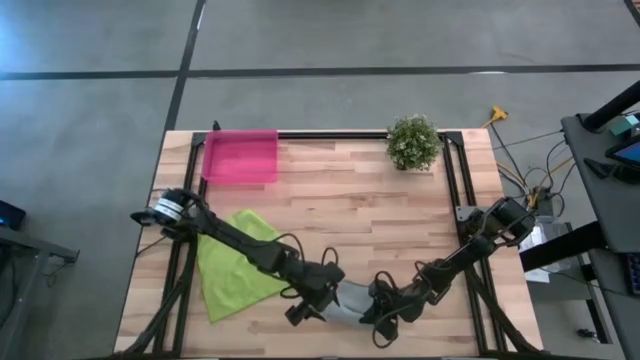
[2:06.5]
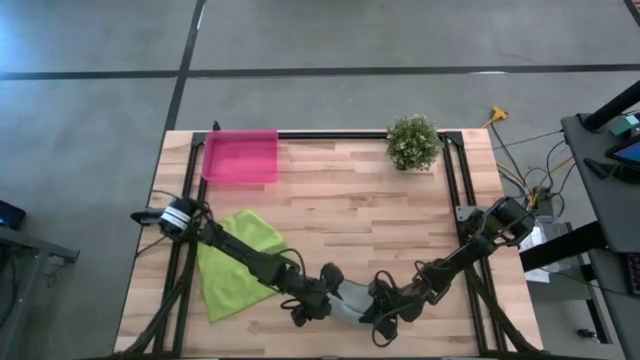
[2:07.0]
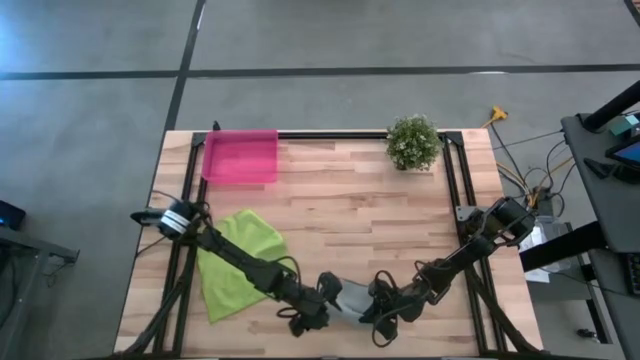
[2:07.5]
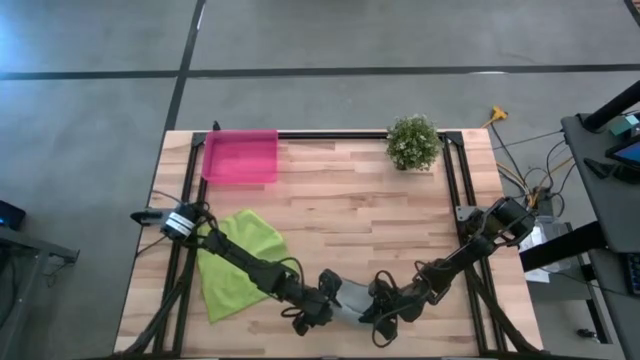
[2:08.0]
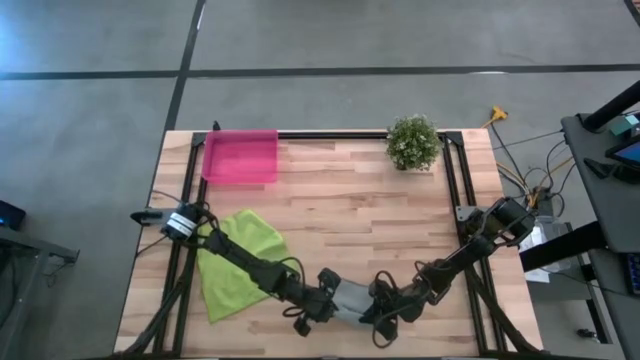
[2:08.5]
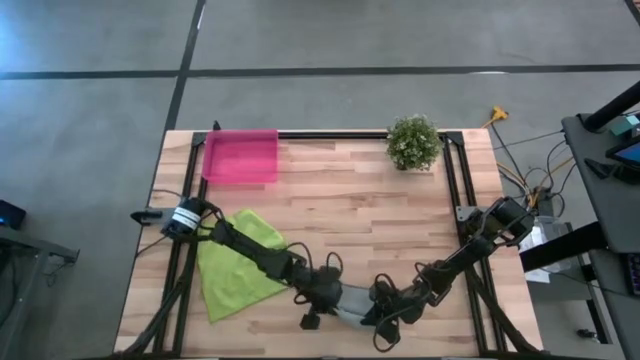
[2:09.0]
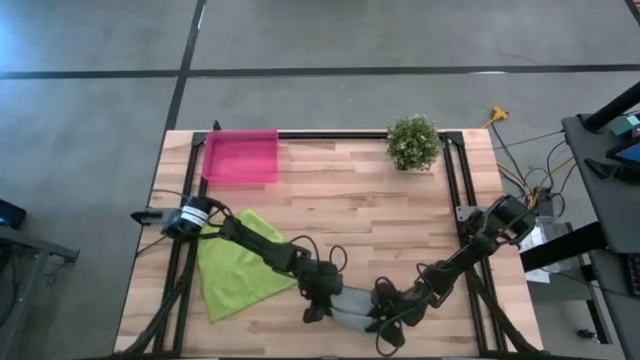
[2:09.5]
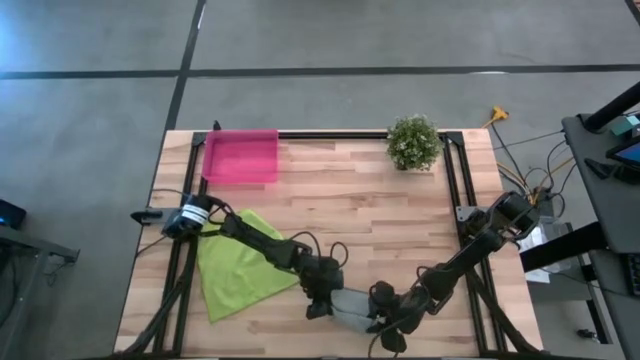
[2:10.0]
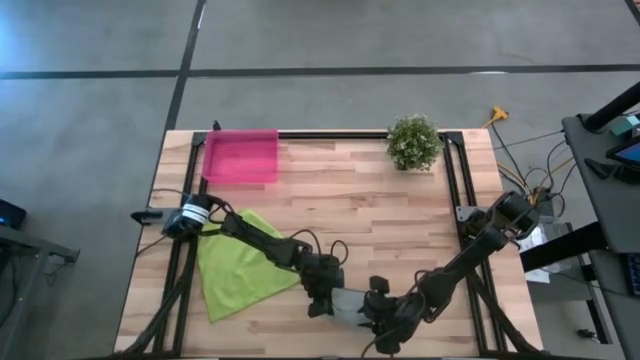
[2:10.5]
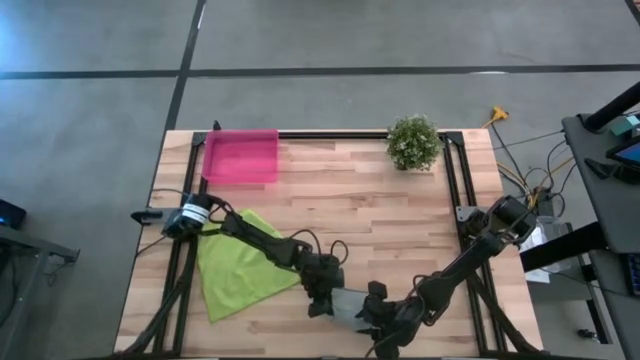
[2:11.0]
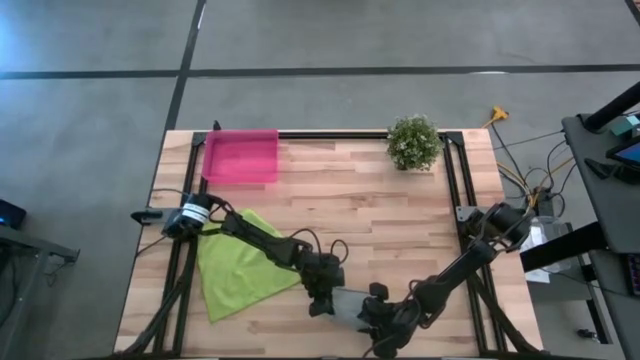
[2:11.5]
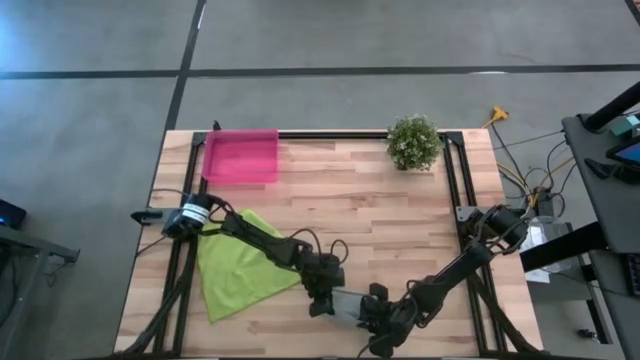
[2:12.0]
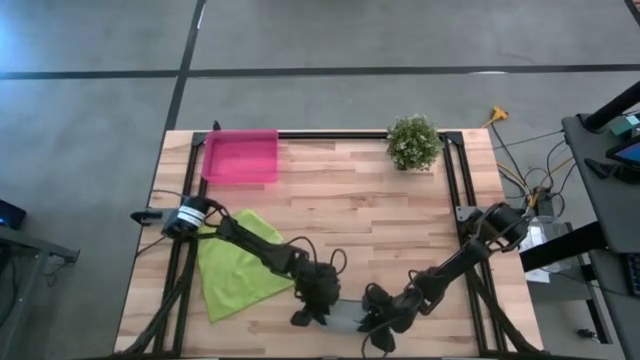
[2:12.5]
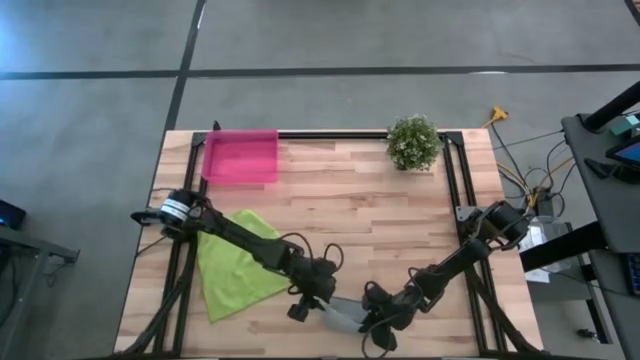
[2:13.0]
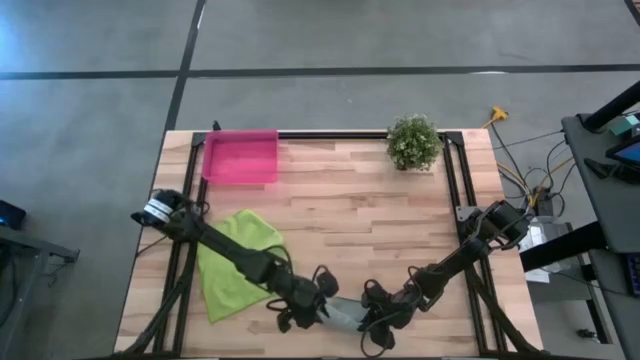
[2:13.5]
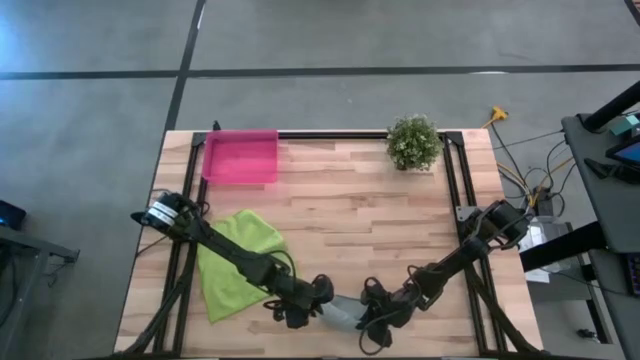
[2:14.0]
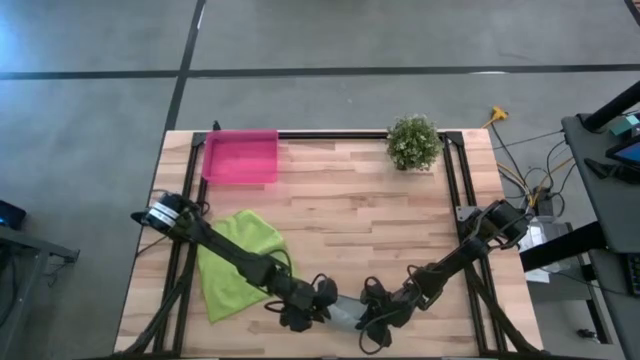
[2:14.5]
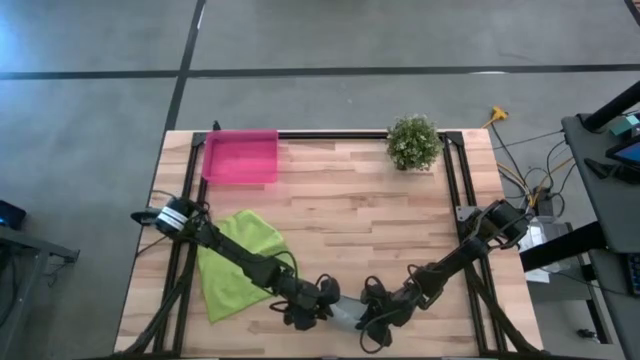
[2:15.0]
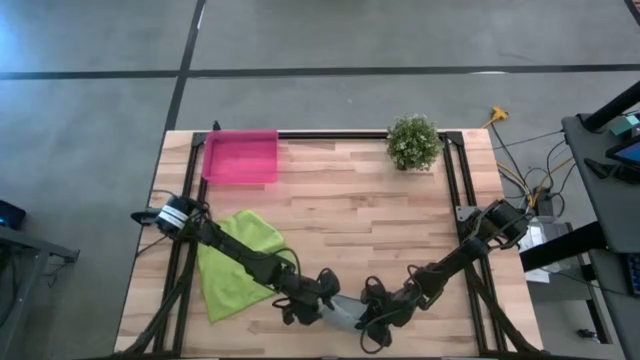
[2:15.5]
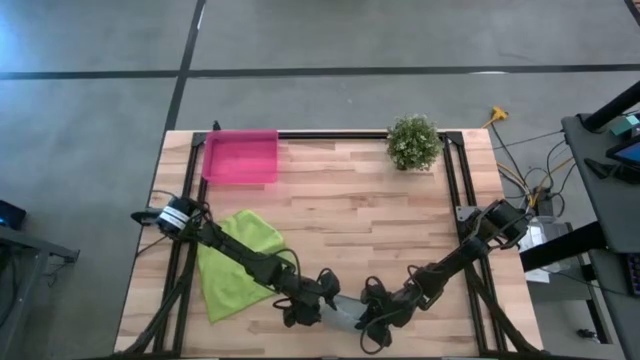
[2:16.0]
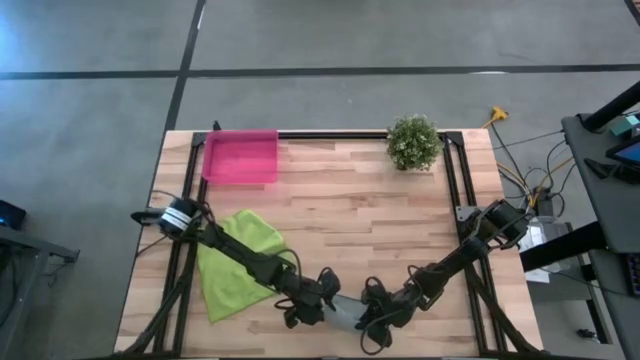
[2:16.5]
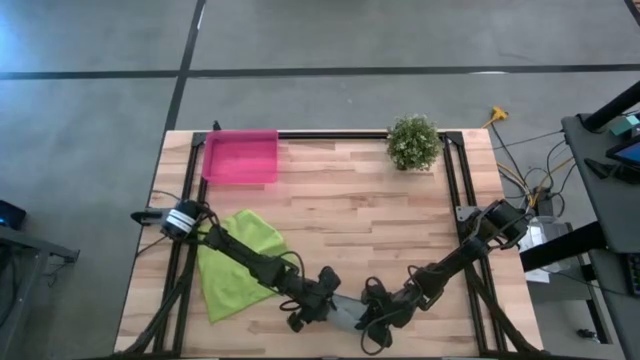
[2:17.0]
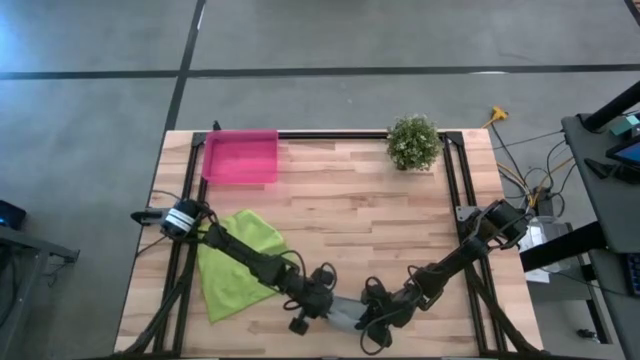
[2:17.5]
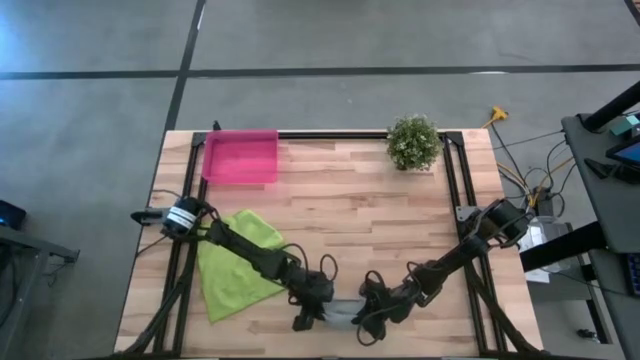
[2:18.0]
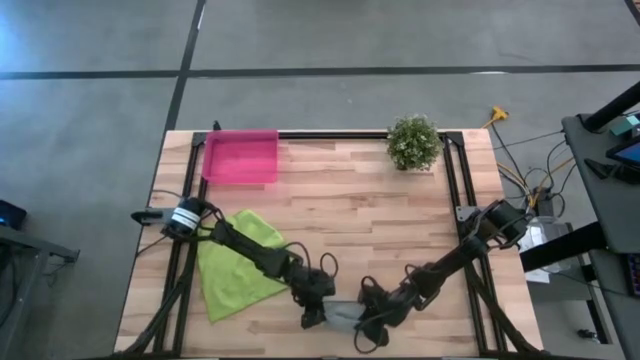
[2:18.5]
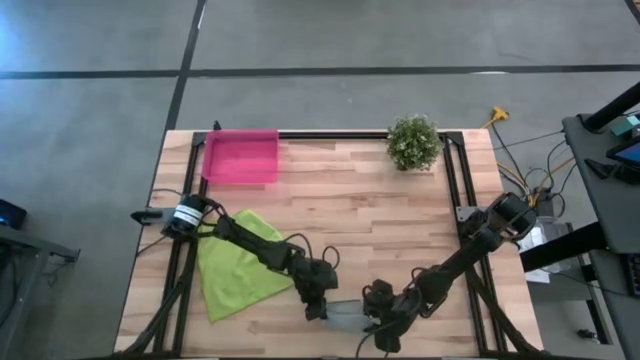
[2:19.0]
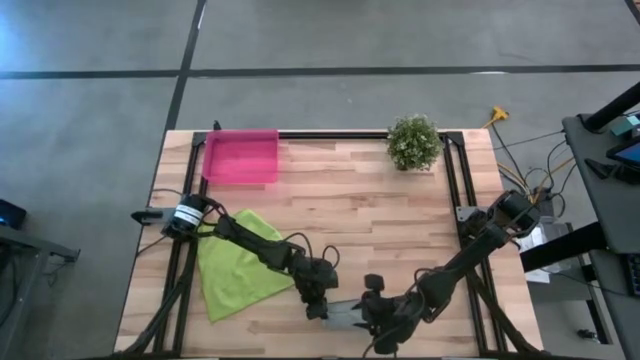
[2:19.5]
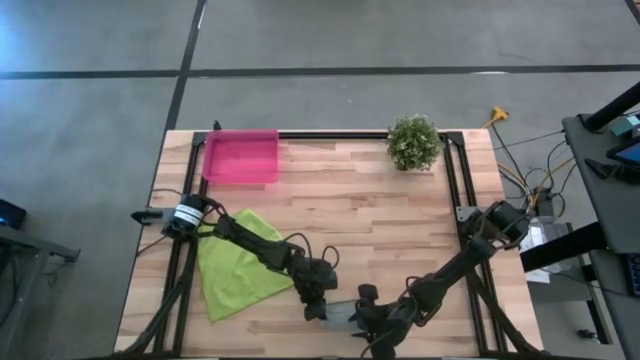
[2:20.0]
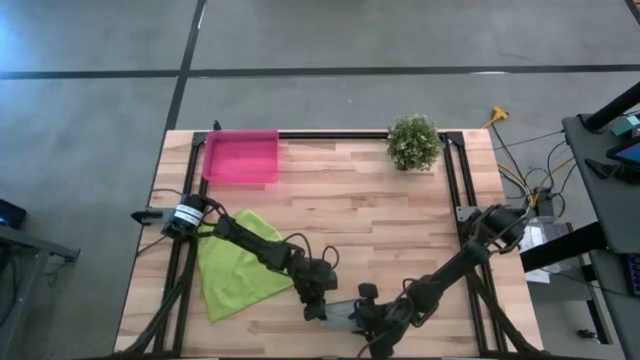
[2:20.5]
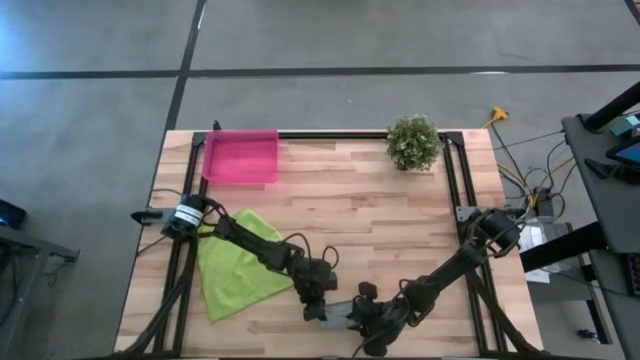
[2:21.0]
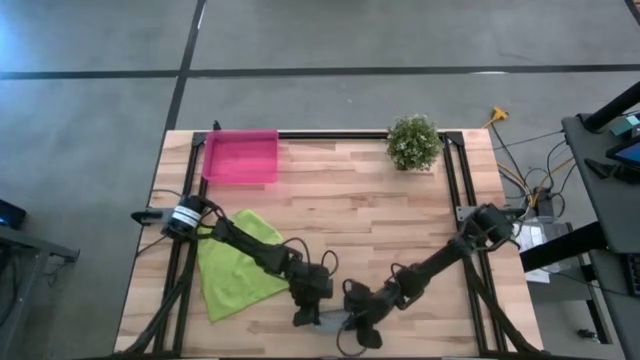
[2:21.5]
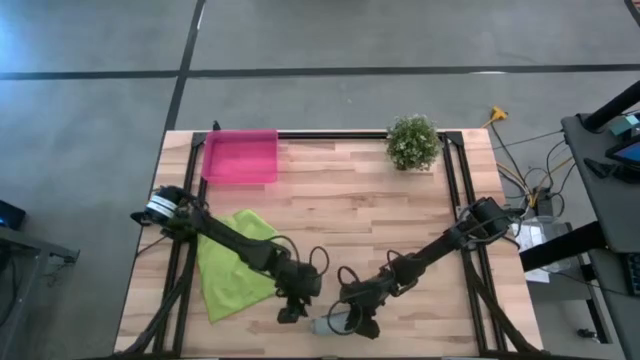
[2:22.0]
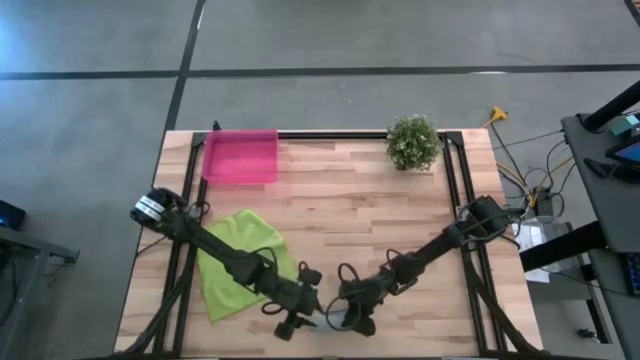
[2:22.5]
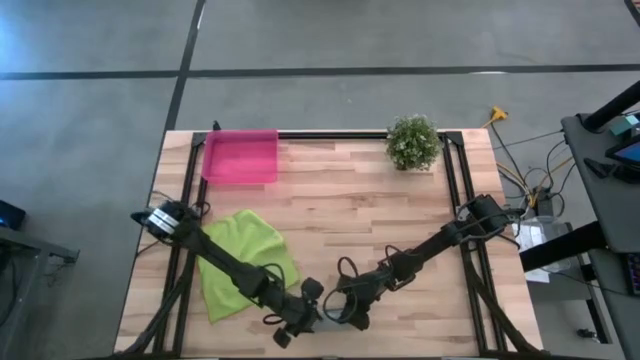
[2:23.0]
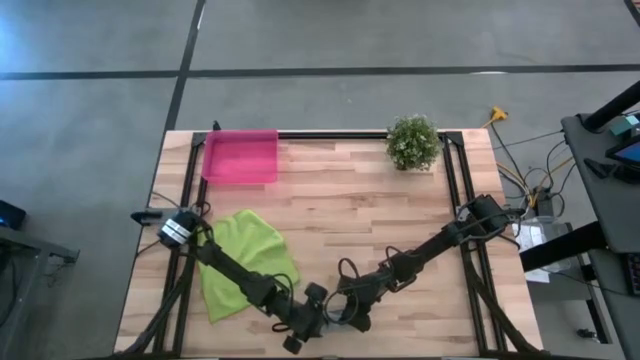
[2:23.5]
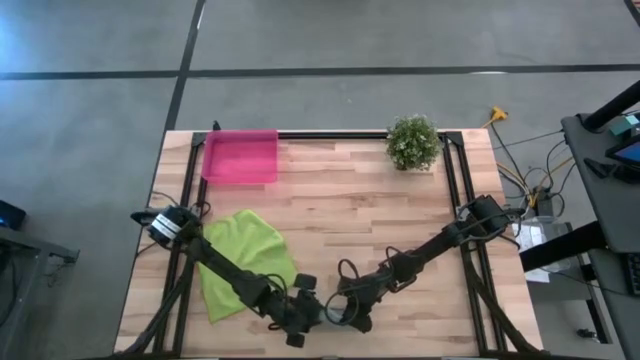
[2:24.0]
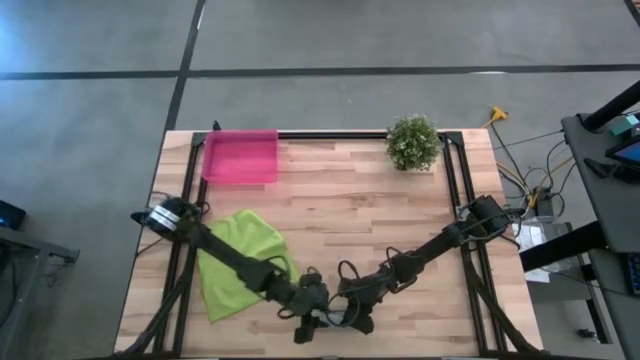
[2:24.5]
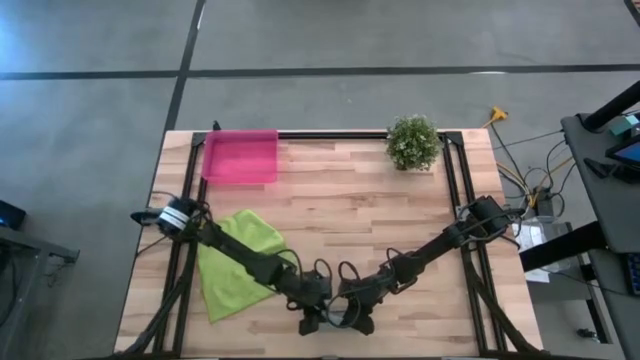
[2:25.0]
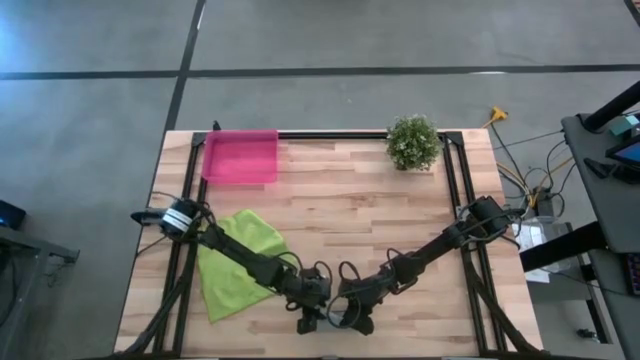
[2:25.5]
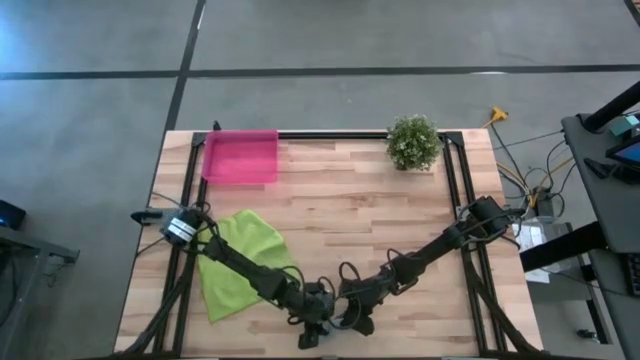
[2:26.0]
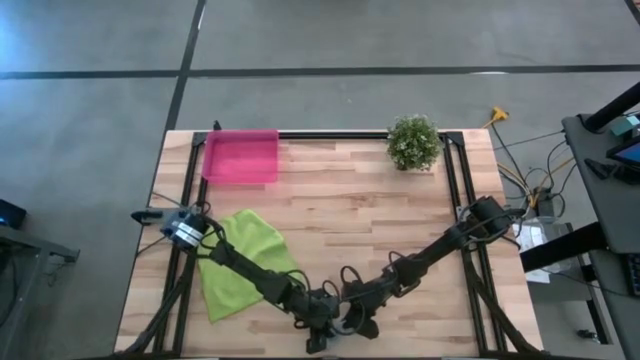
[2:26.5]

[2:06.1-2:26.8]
Task: Roll microfiber towels into tight, uniform cylinder then place into a basket
Roll the blue microfiber cloth

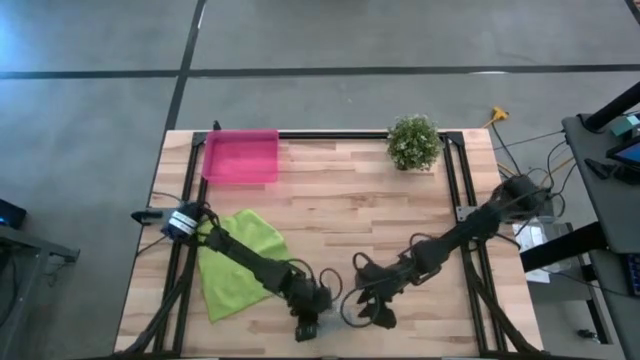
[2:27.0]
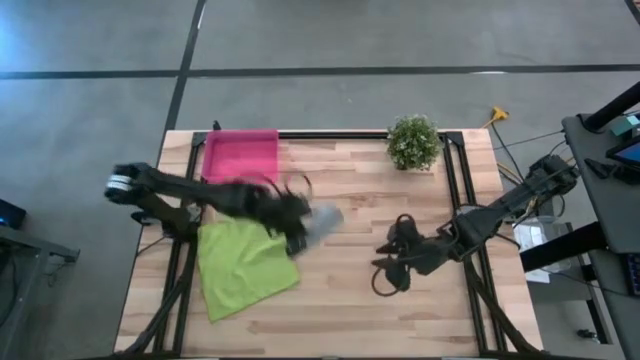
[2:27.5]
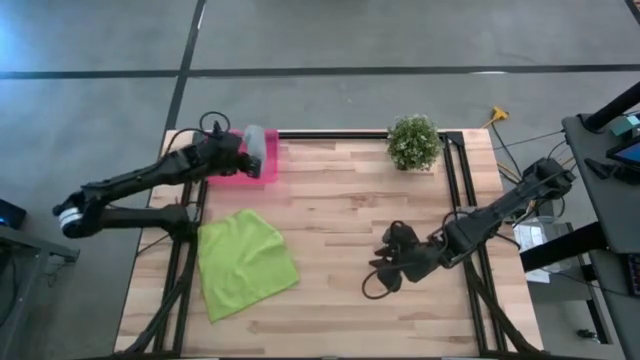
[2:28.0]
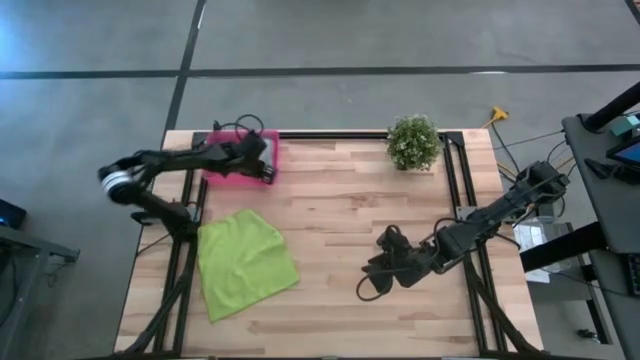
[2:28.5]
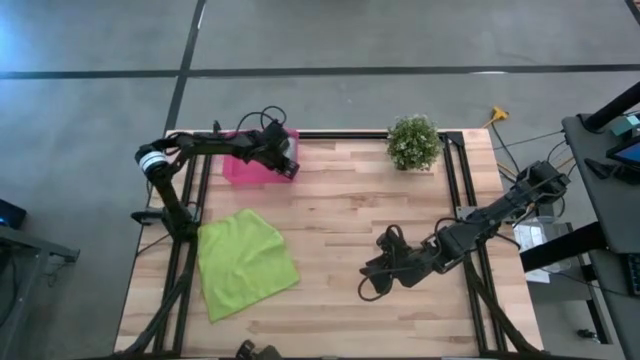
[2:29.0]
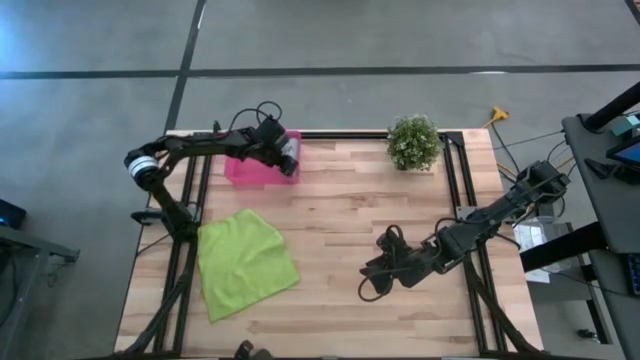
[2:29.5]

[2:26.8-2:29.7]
Put the blue microfiber cloth into the pink bin
